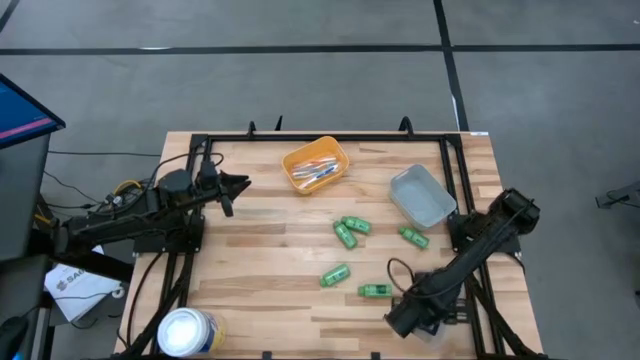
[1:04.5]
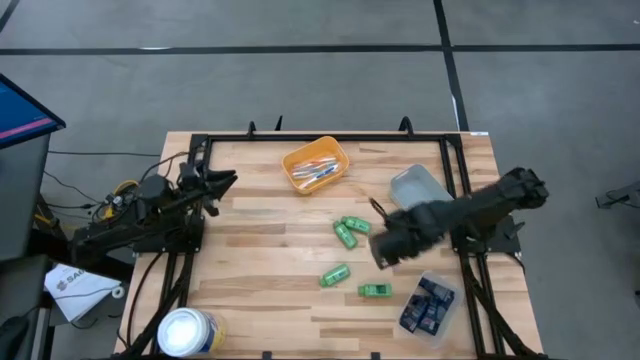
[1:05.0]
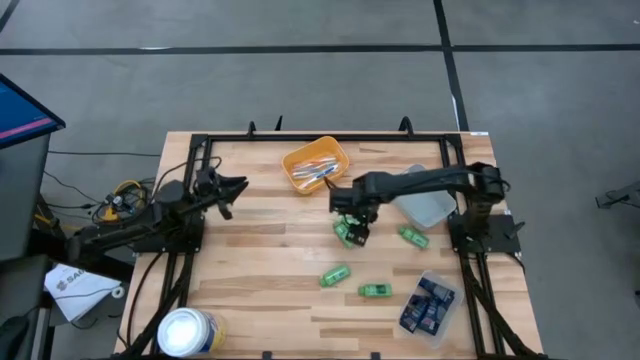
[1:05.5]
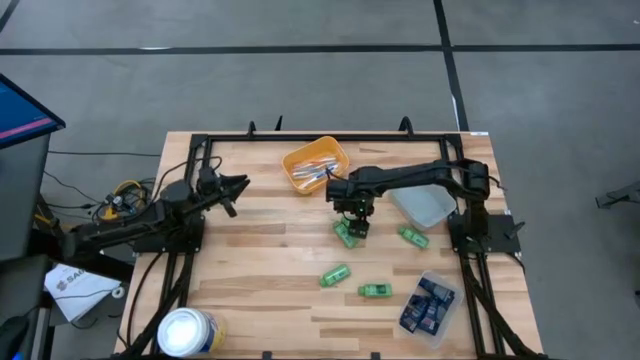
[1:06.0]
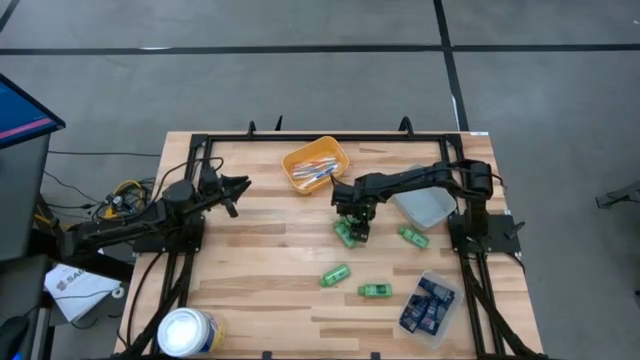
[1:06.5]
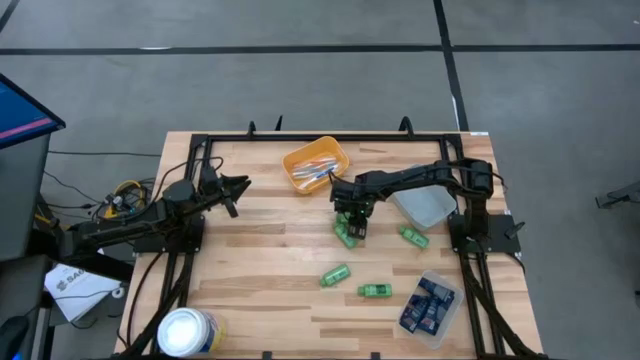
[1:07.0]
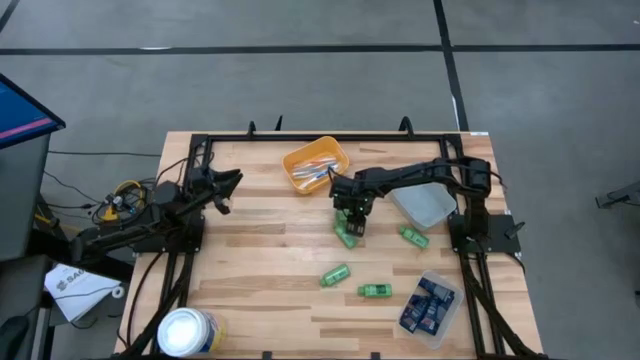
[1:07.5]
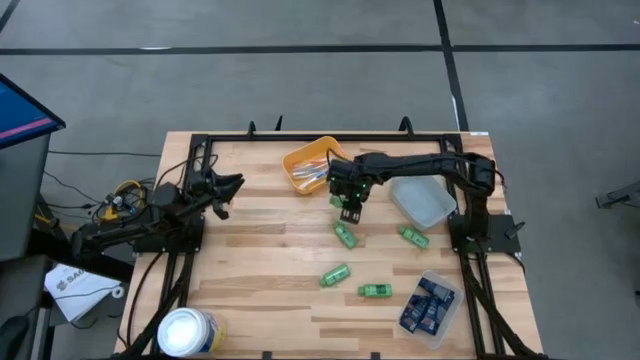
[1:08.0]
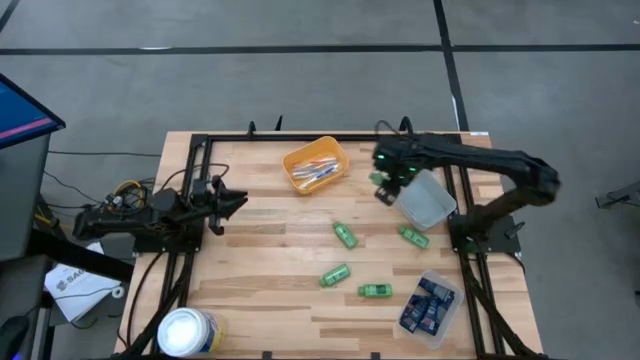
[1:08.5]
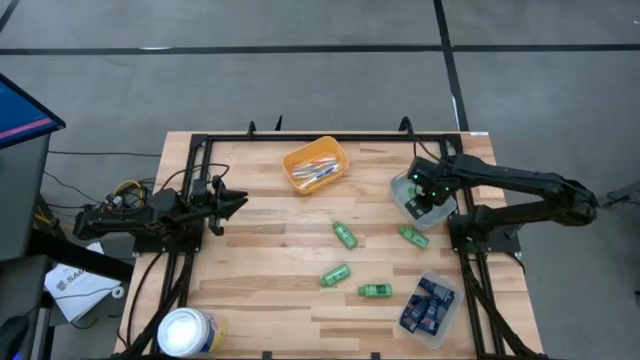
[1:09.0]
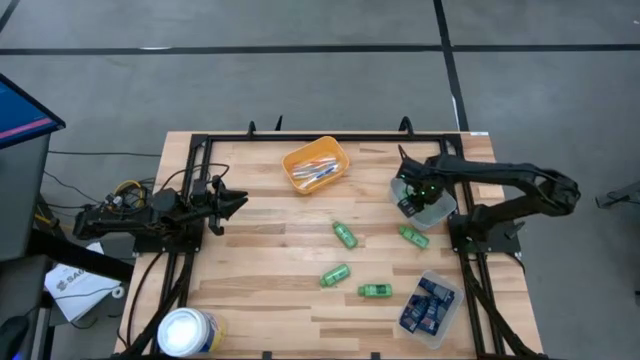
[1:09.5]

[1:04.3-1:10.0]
Task: Pick & Place Travel size toiletries
Put the green shampoo bottle into the grey bin

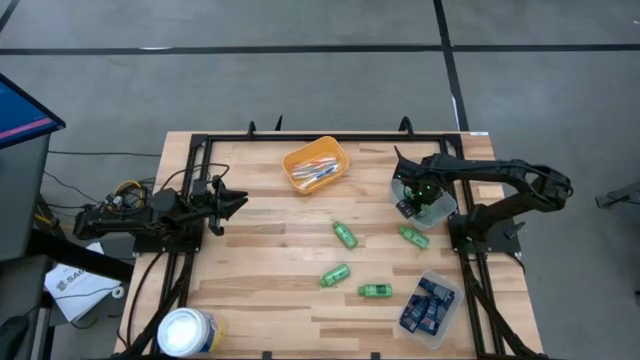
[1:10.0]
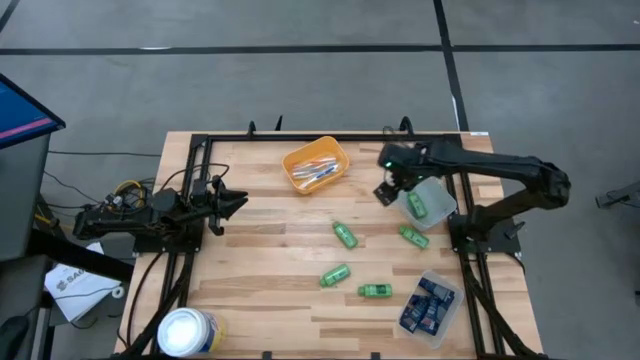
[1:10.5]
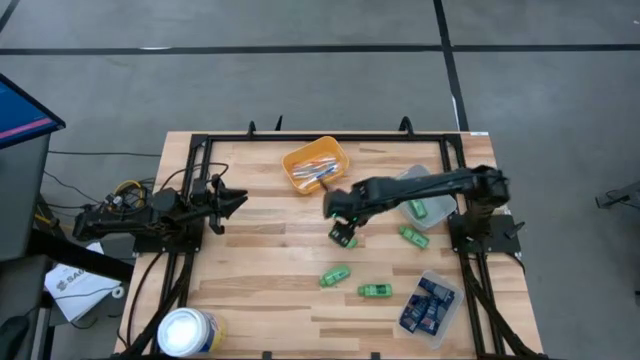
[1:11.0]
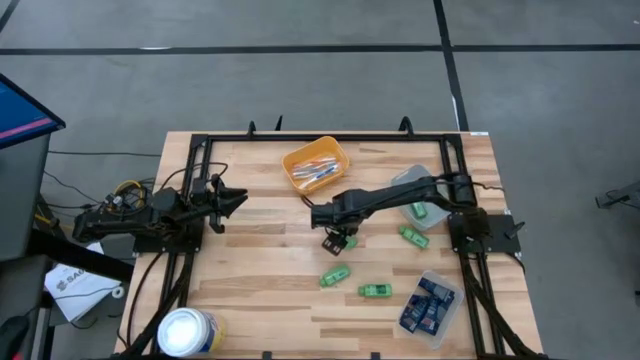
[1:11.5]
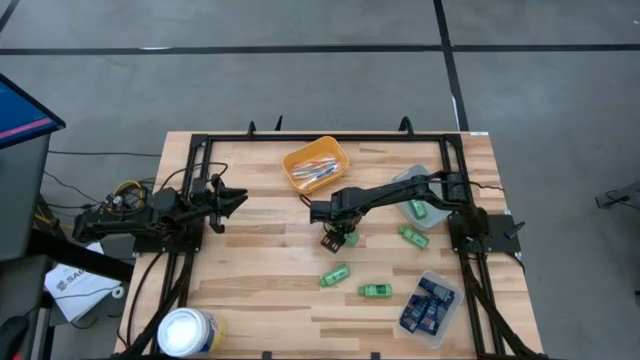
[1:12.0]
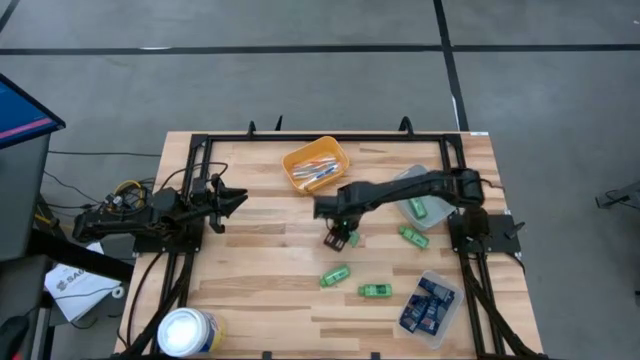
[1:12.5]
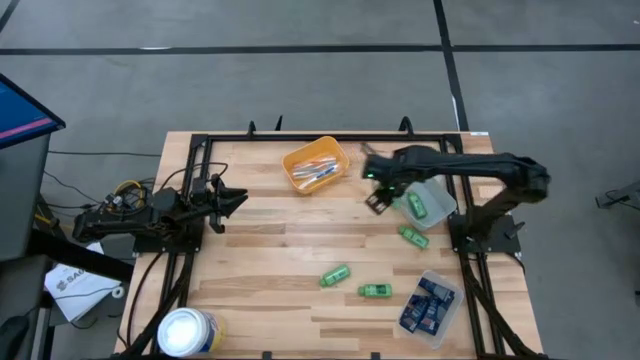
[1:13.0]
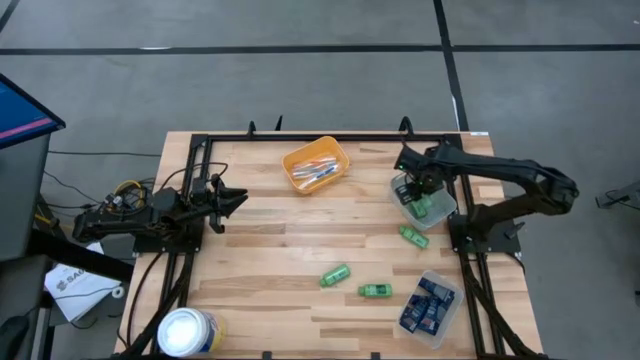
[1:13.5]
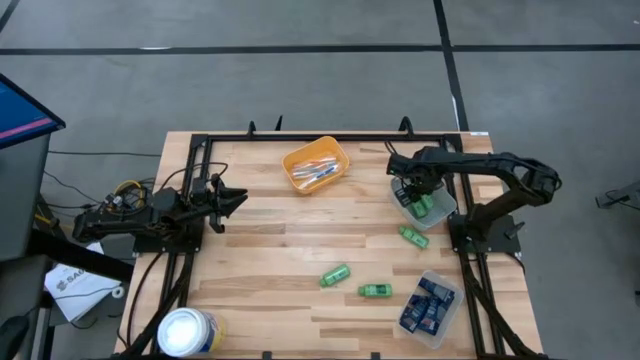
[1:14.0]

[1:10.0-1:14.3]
Put the green shampoo bottle into the gray bin

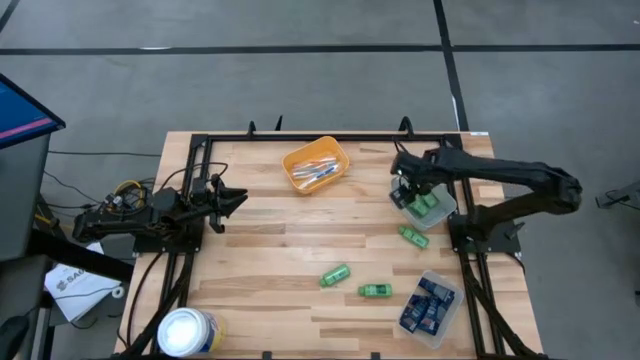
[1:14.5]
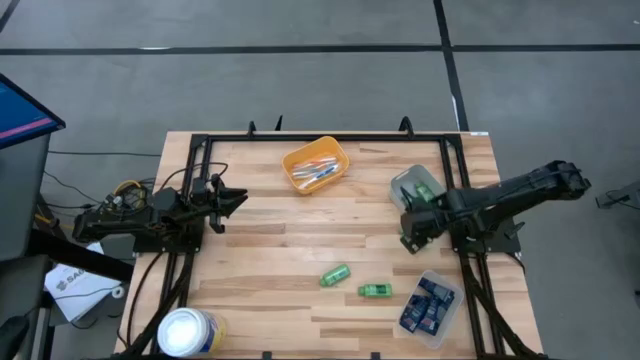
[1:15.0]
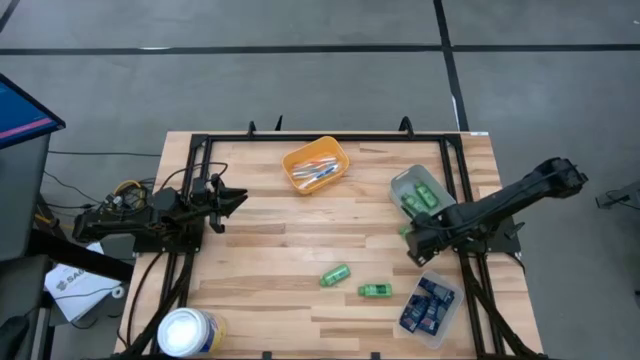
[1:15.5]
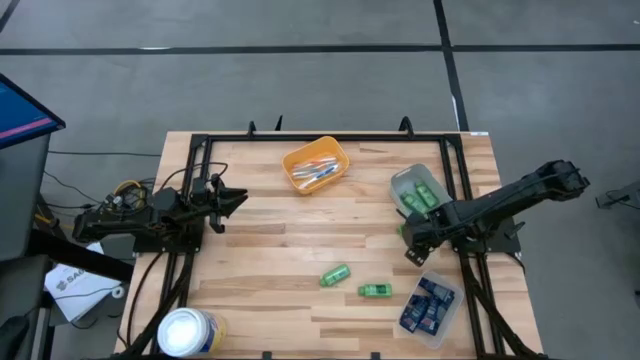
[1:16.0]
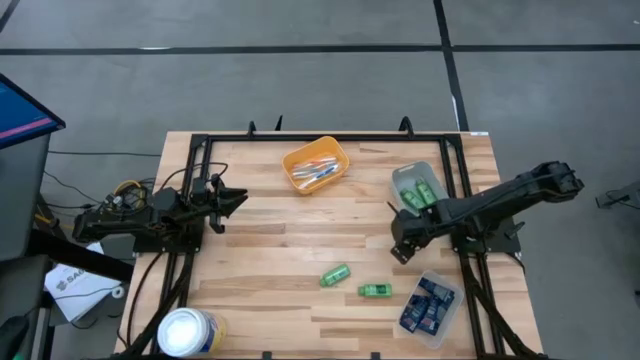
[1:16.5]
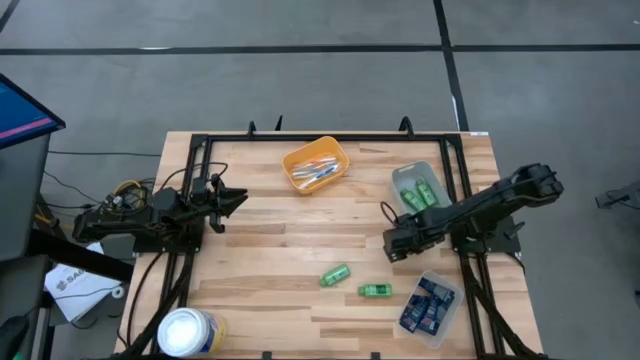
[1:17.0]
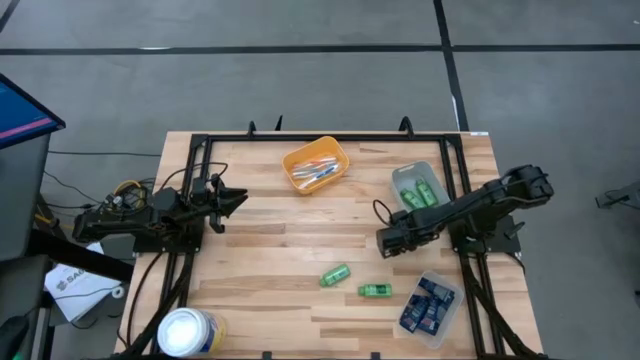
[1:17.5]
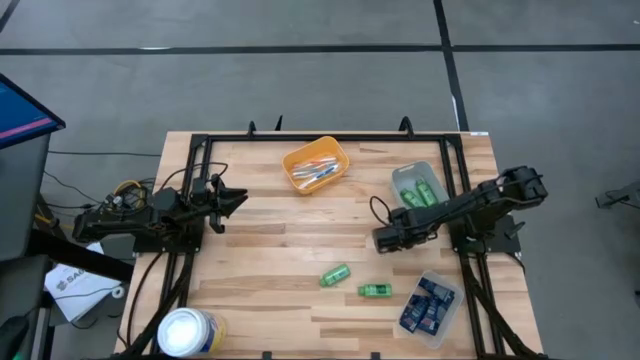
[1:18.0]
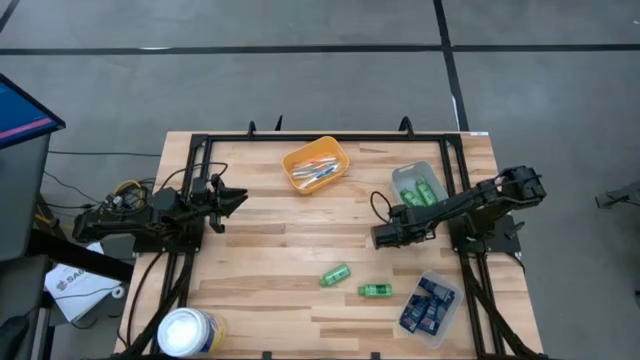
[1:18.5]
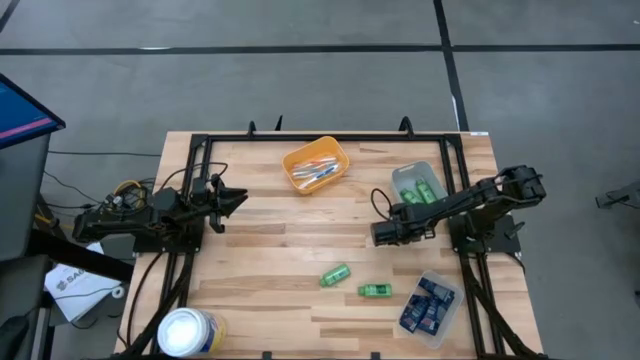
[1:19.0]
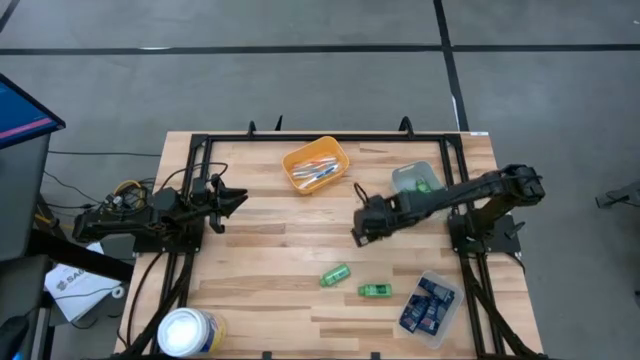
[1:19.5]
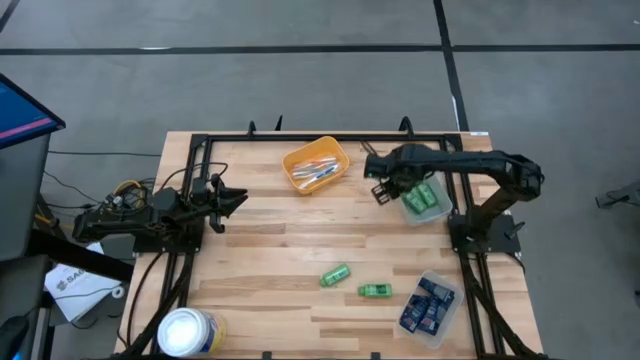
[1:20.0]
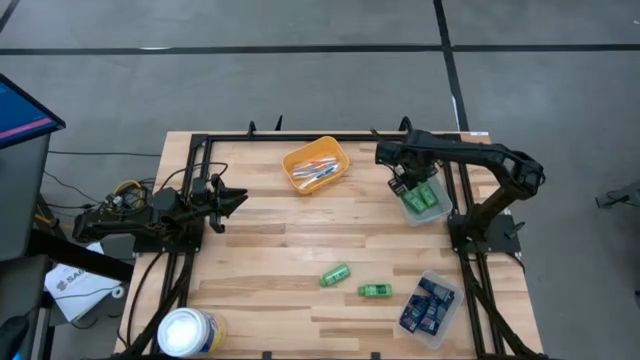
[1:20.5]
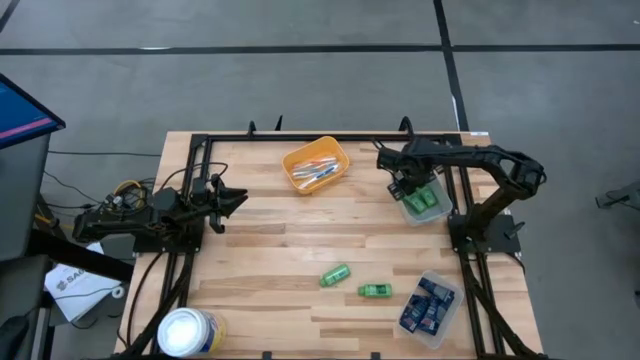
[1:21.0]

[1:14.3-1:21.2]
Put the green shampoo bottle into the gray bin

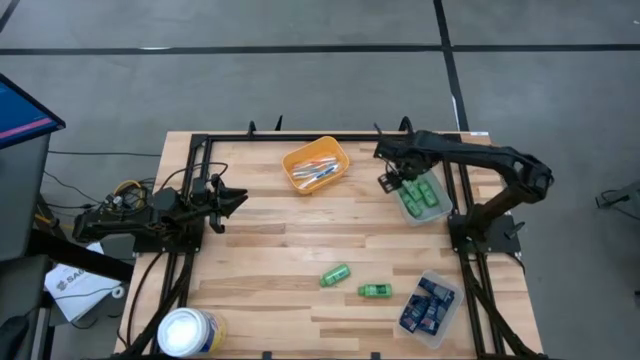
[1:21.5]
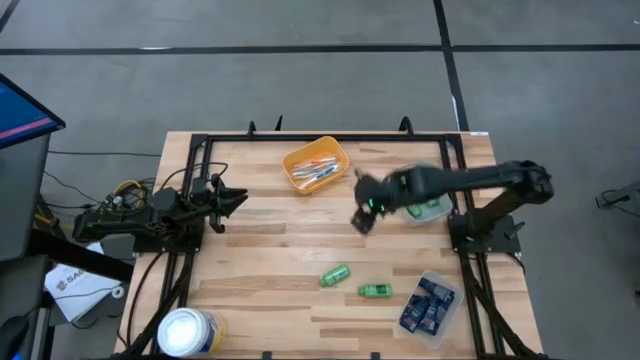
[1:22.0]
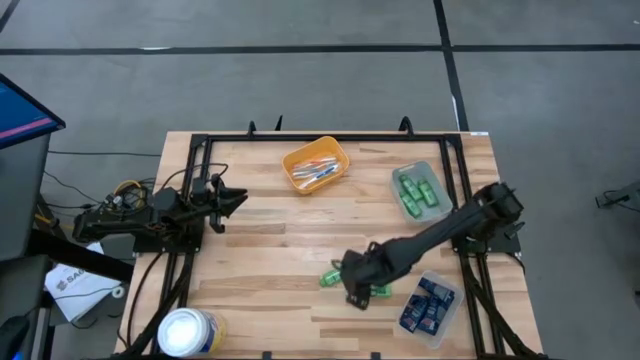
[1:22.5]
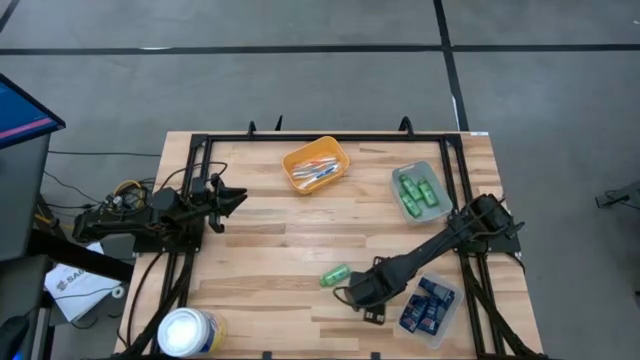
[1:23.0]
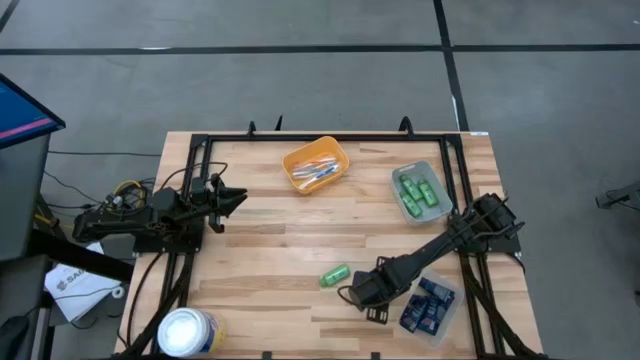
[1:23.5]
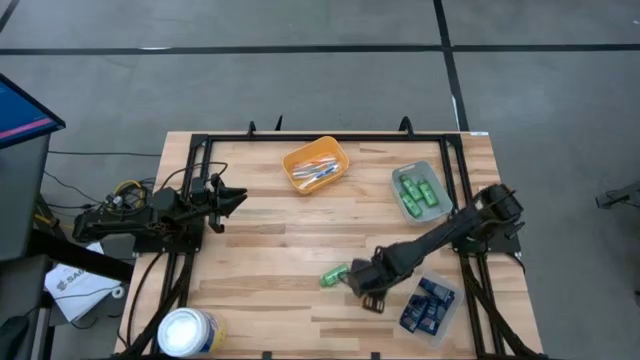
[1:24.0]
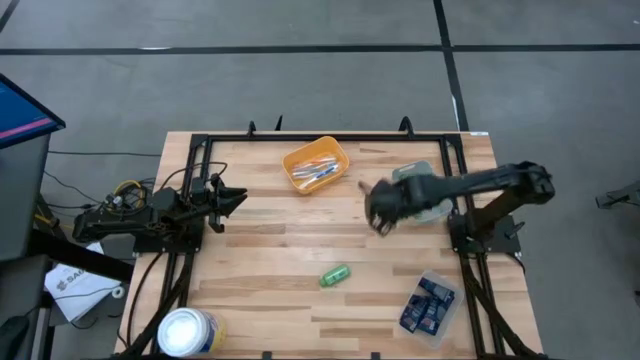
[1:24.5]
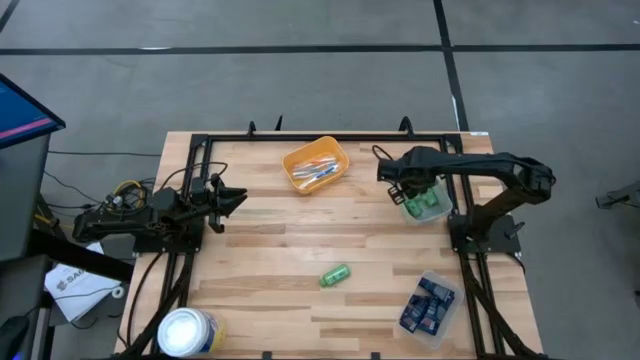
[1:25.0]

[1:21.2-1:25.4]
Put the green shampoo bottle into the gray bin
